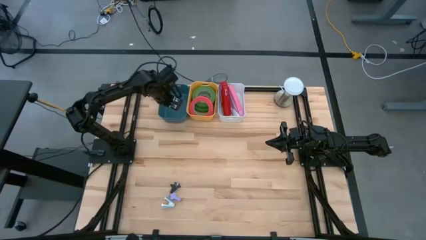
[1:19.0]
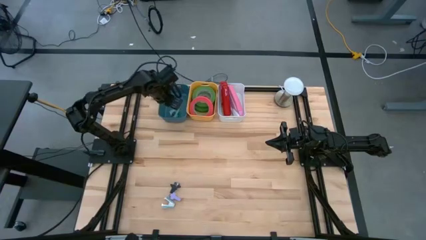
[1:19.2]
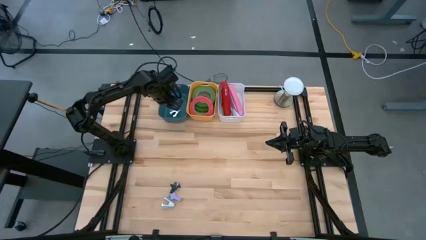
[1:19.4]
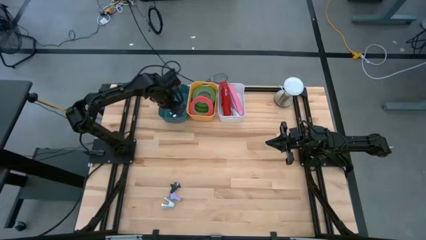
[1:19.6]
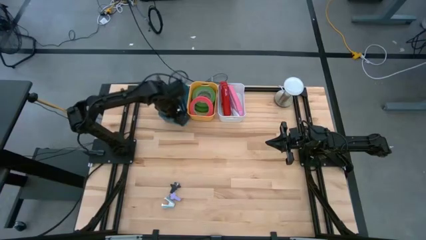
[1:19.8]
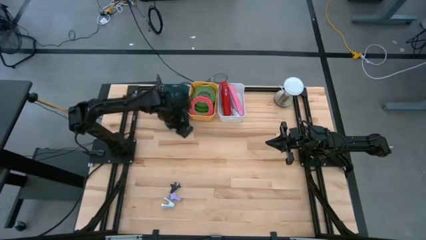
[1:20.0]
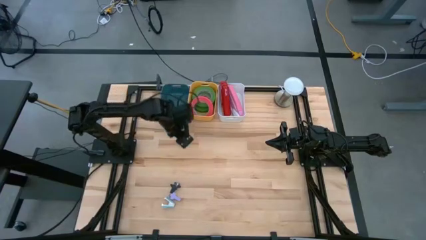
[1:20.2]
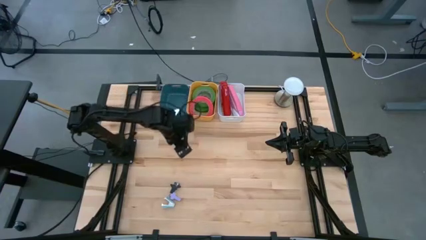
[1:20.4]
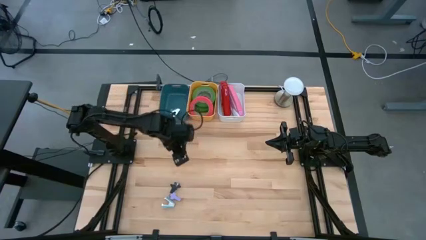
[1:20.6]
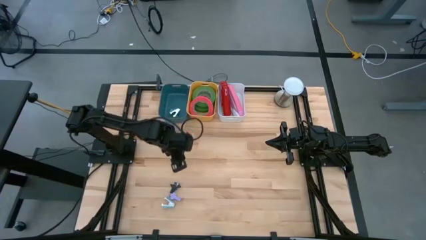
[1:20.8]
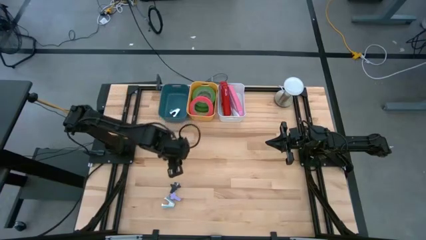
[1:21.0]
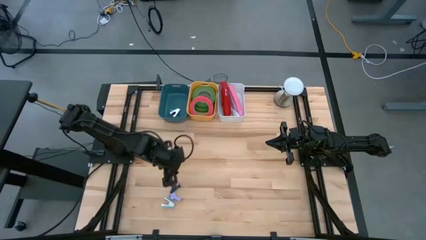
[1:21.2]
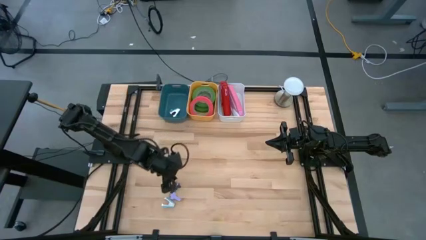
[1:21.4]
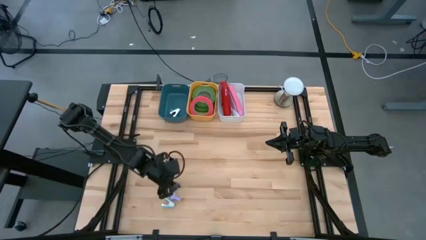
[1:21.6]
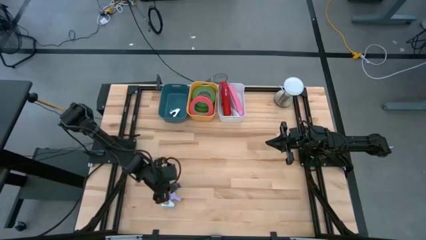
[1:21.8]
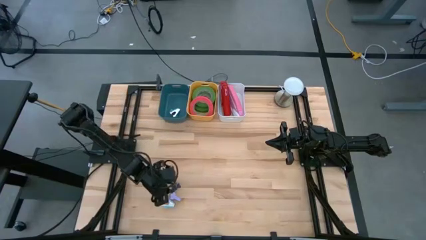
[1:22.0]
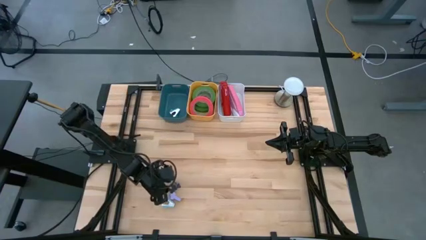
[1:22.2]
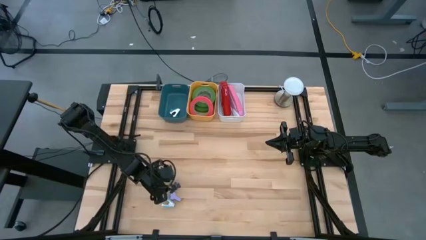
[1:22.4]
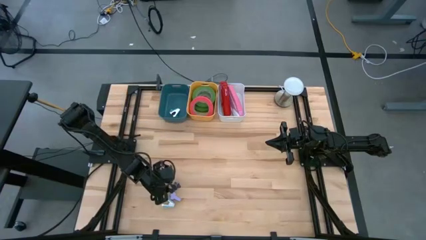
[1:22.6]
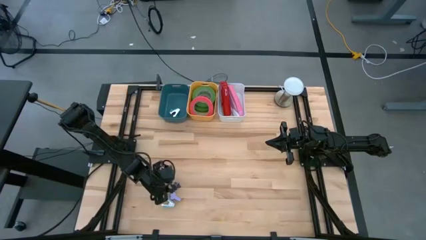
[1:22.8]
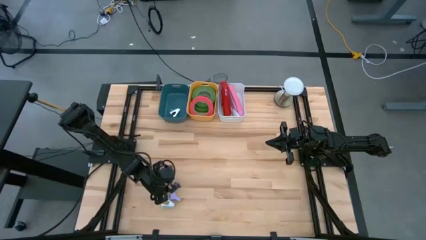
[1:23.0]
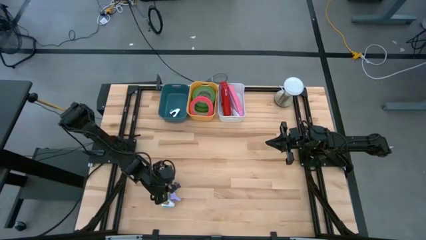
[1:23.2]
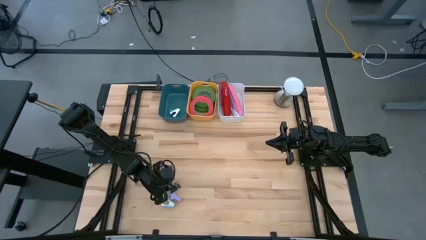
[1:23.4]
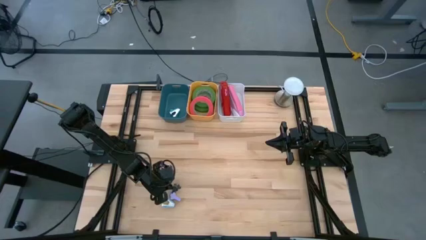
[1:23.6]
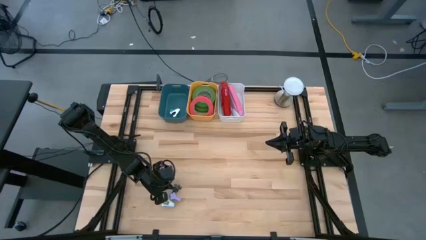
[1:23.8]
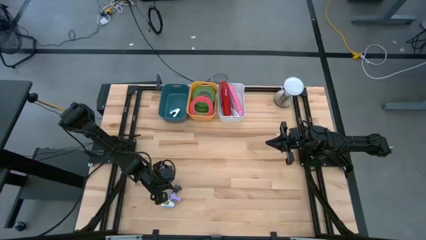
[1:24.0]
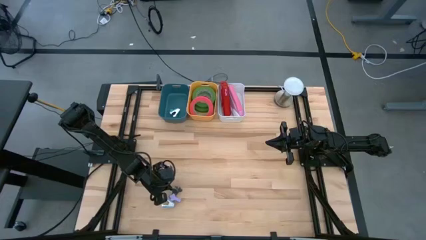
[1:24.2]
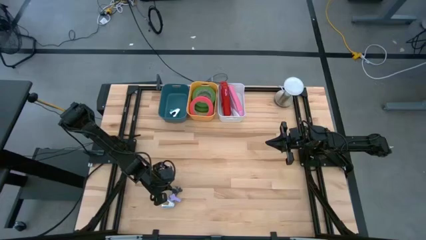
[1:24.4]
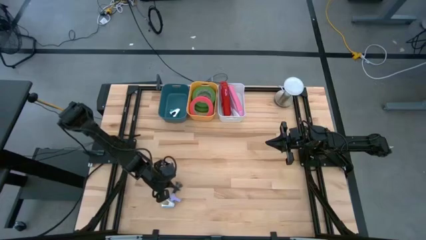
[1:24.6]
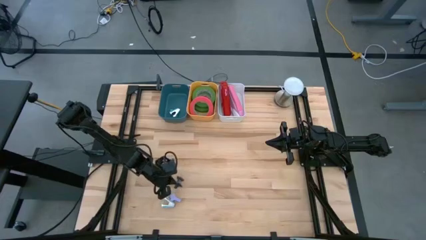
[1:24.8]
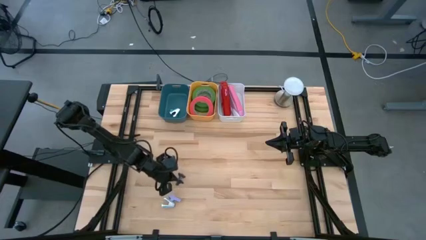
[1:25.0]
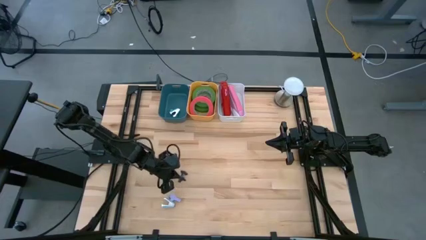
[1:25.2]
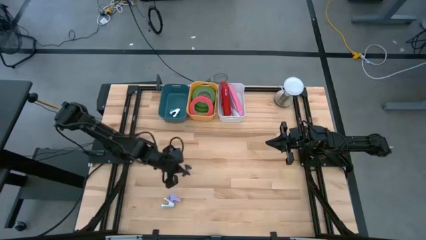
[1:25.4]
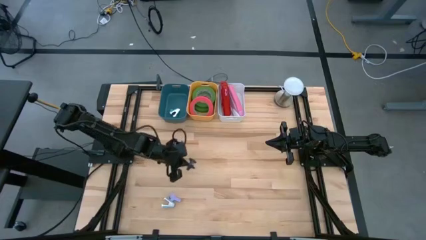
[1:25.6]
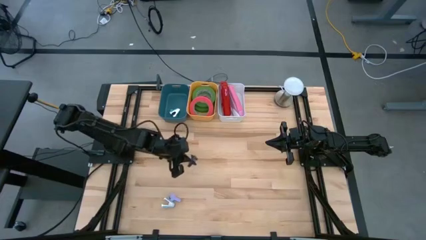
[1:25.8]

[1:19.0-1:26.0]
Task: Pick and place Stapler, Stapler remover, tape
Put the black staple remover into the blue bin

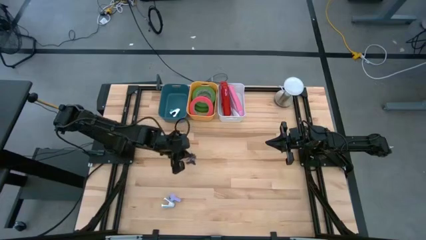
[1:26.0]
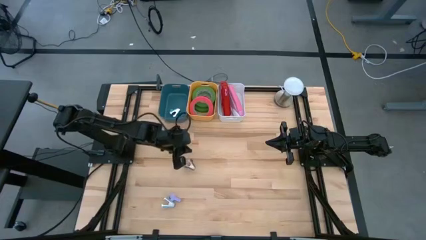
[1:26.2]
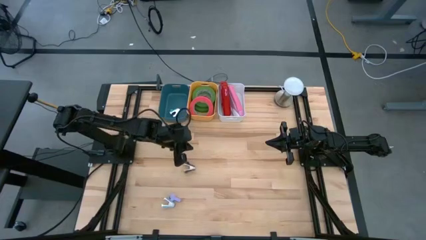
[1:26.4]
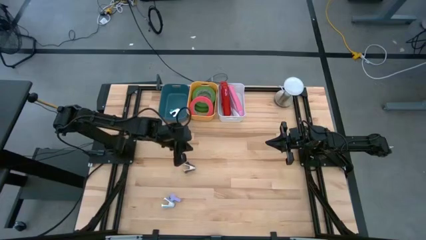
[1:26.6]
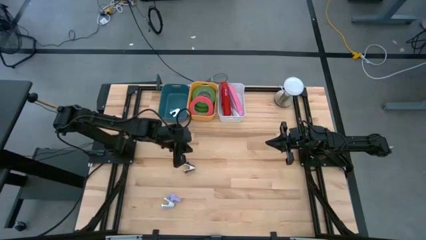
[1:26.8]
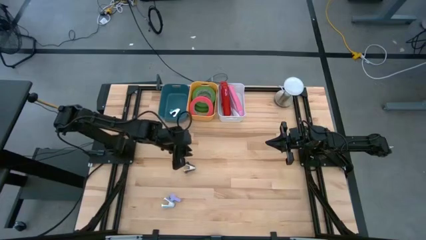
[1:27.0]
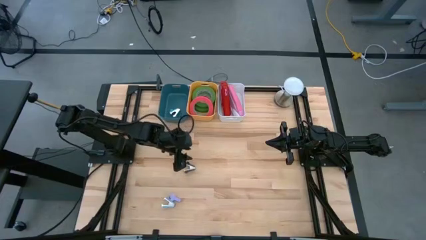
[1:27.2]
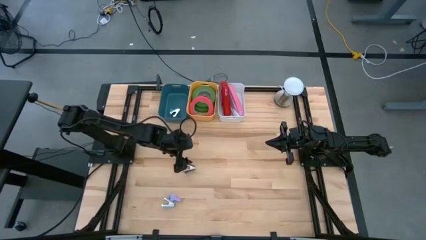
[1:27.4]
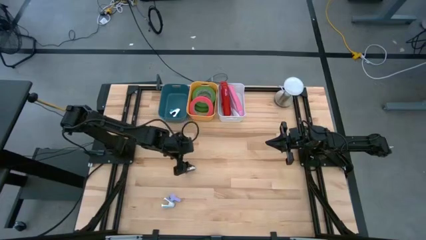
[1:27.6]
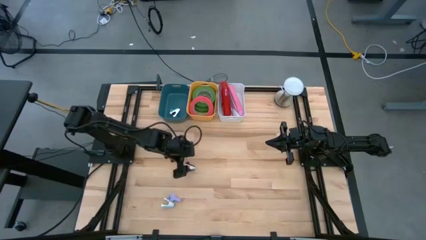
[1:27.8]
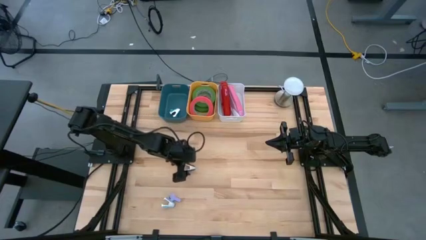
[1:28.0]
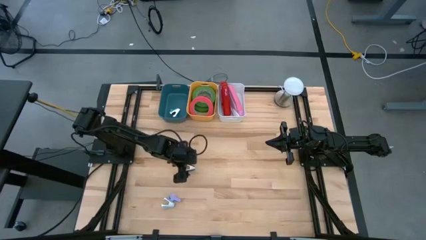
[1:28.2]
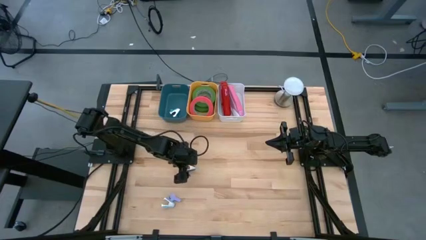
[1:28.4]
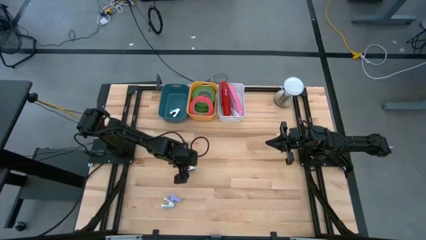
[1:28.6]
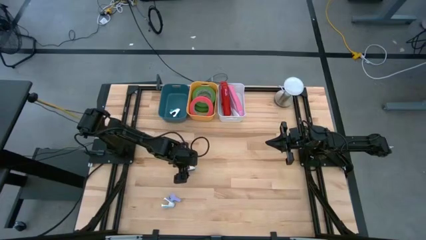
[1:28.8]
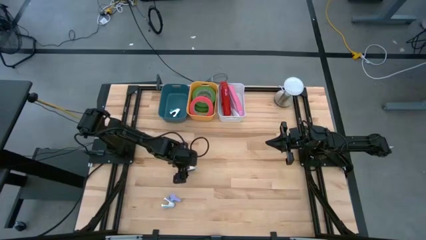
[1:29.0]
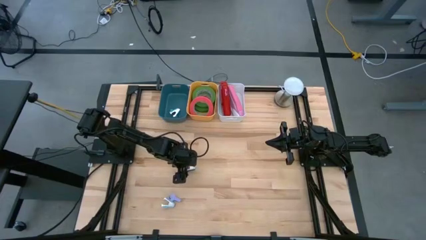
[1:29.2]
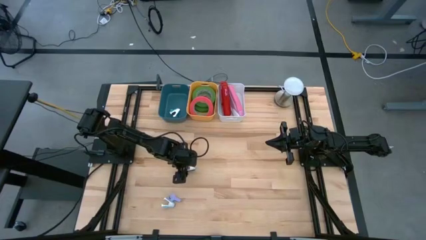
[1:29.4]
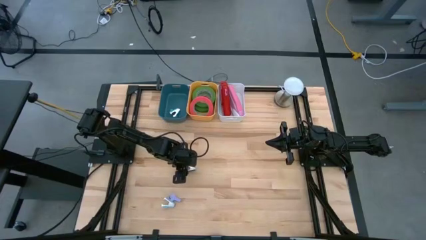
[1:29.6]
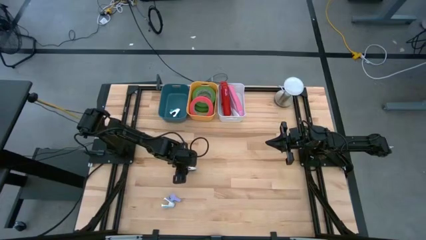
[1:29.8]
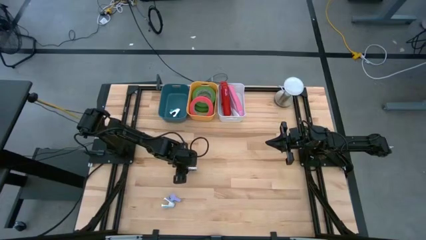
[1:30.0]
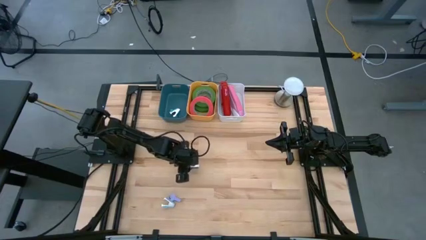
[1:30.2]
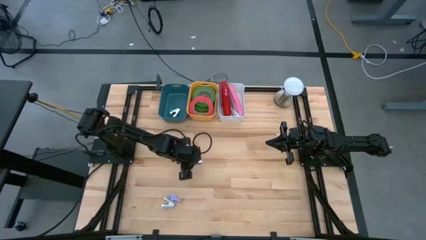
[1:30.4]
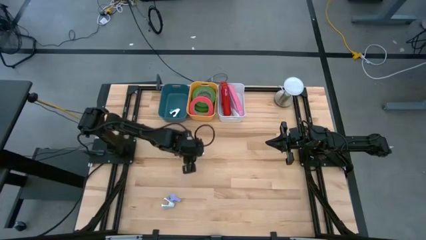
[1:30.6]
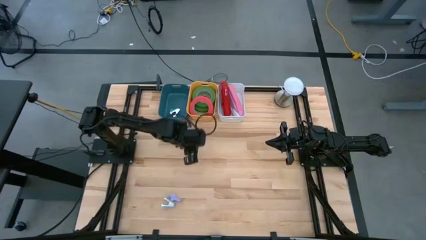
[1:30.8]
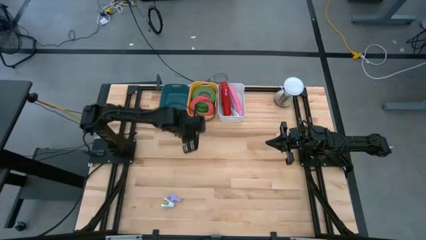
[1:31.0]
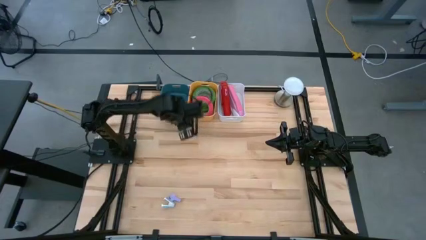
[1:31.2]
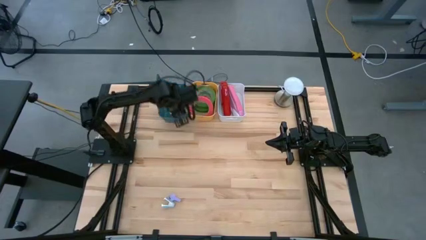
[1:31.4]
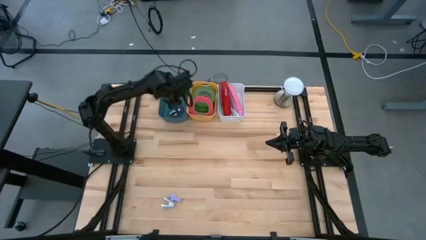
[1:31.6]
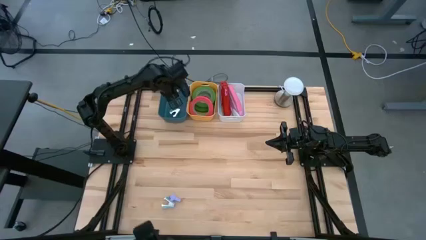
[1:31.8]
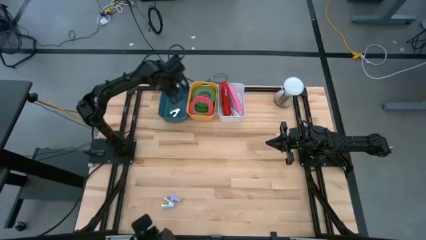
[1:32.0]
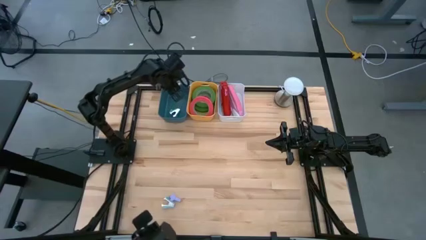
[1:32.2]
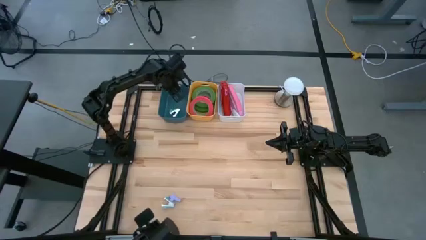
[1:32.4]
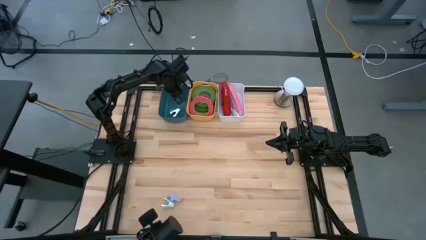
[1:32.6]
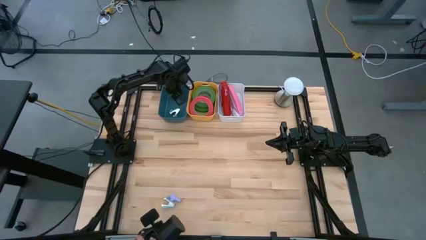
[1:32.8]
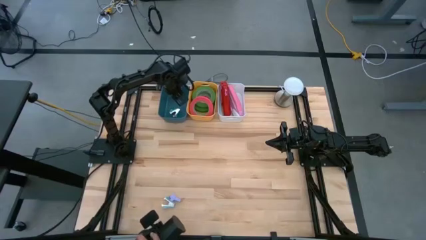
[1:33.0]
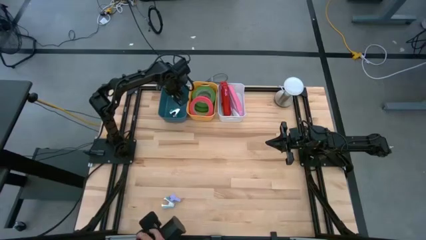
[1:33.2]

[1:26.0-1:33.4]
Put the black staple remover into the blue bin

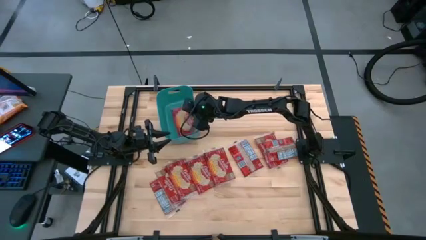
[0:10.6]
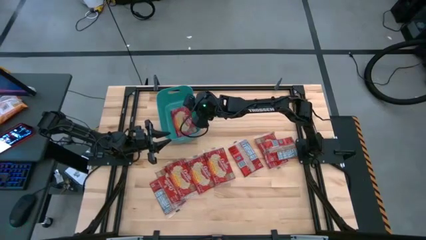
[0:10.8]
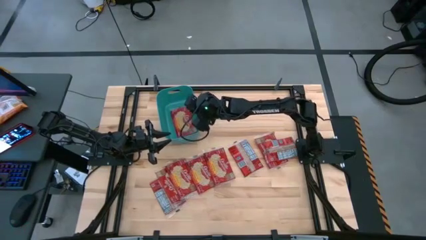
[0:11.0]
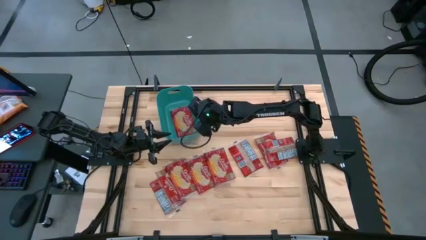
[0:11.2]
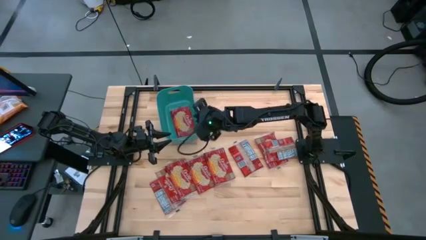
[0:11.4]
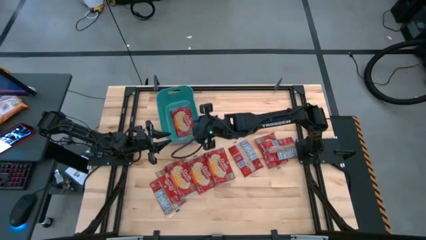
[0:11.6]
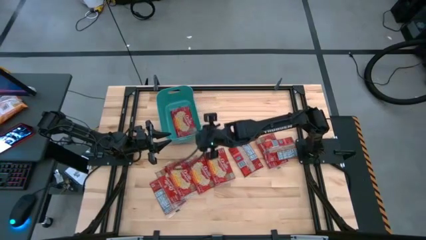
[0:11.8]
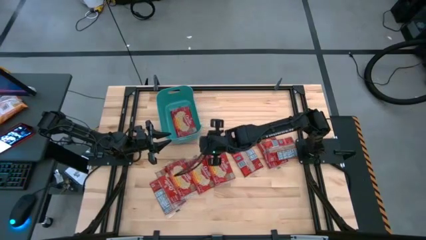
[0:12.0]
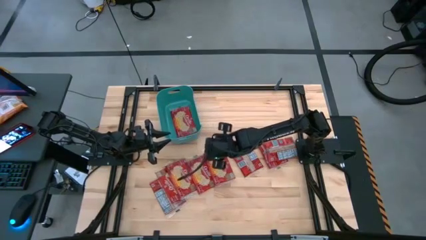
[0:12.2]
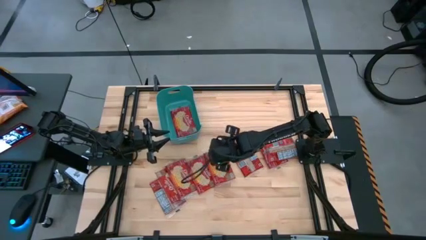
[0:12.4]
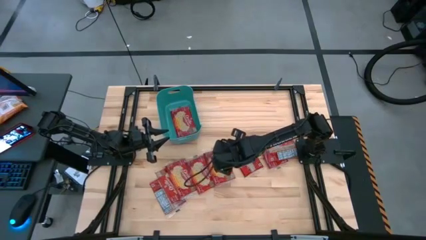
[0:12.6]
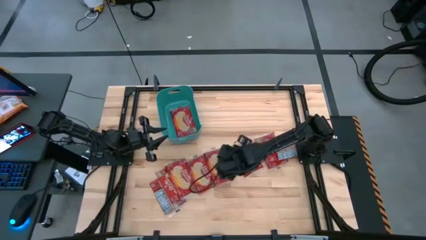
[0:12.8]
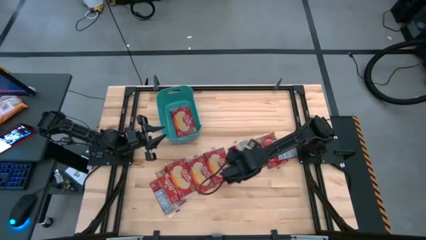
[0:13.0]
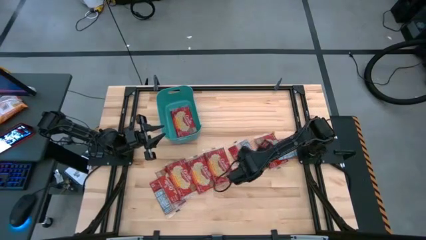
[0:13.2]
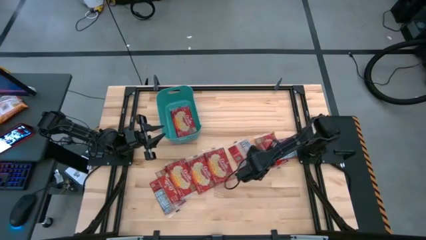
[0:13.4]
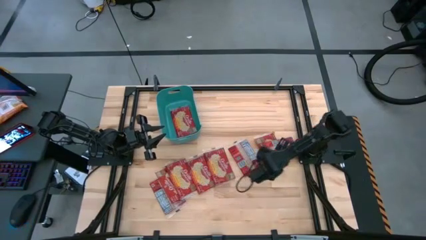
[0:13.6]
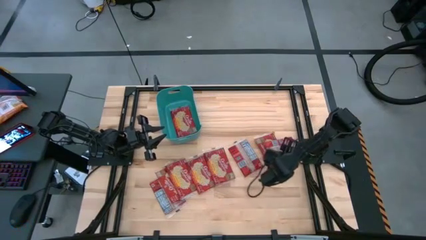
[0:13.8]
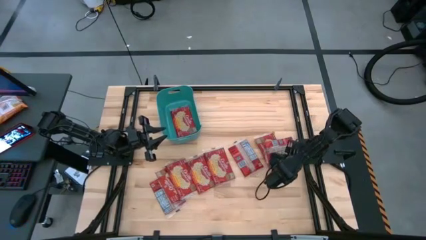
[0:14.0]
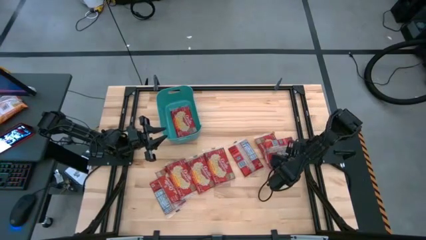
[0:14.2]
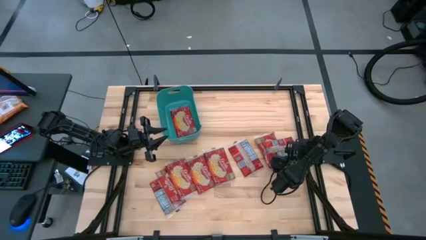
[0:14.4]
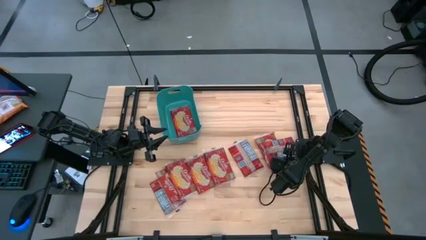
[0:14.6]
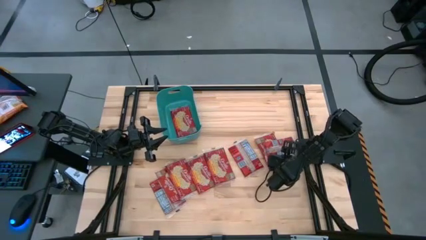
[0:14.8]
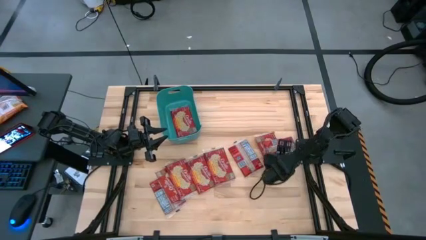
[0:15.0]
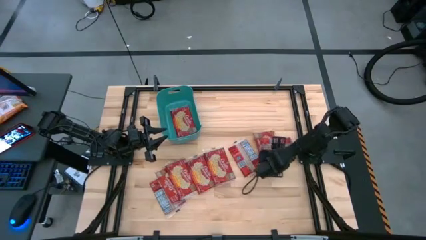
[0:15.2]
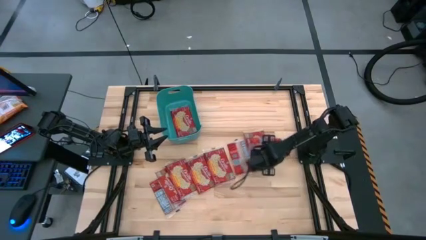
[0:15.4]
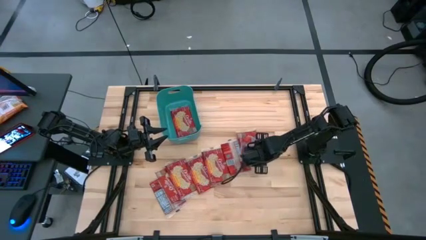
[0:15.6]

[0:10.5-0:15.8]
Task: Sort popcorn bags into baskets
Put the red popcorn bag into the green bin
